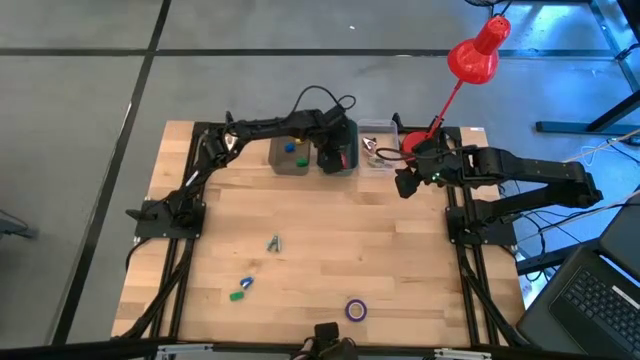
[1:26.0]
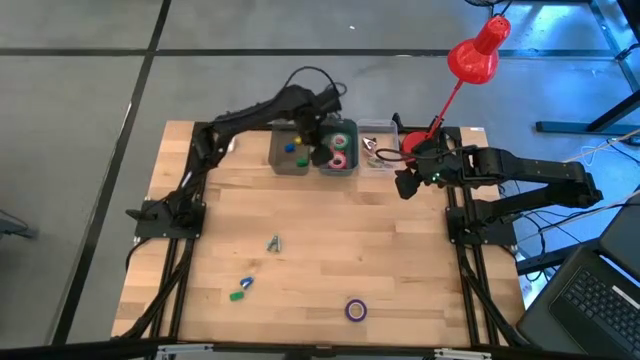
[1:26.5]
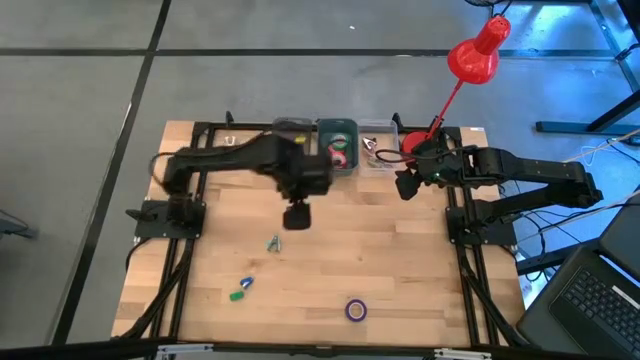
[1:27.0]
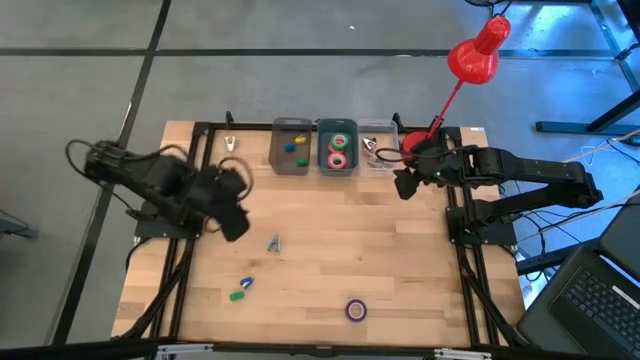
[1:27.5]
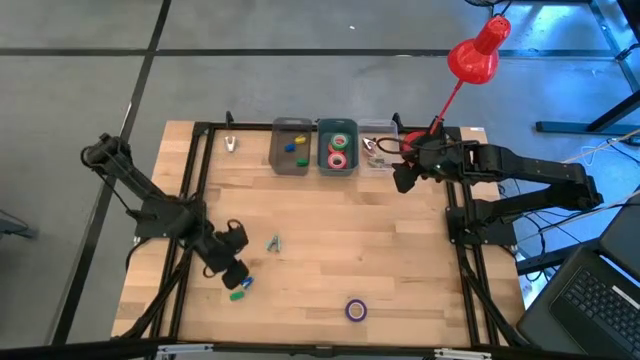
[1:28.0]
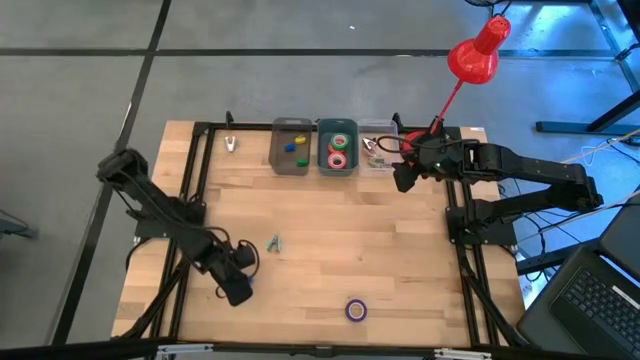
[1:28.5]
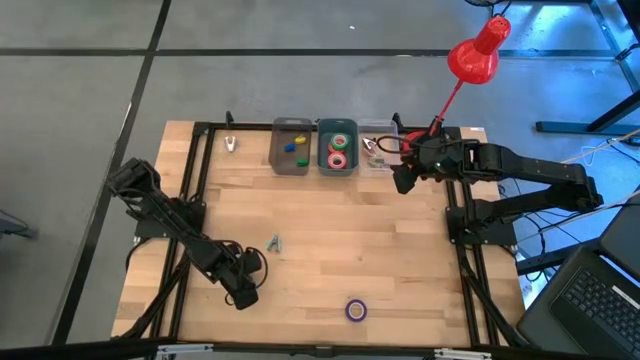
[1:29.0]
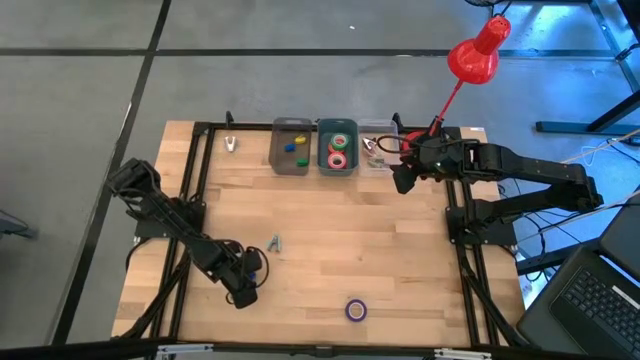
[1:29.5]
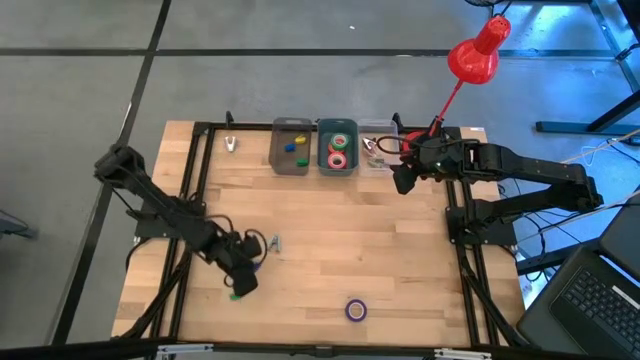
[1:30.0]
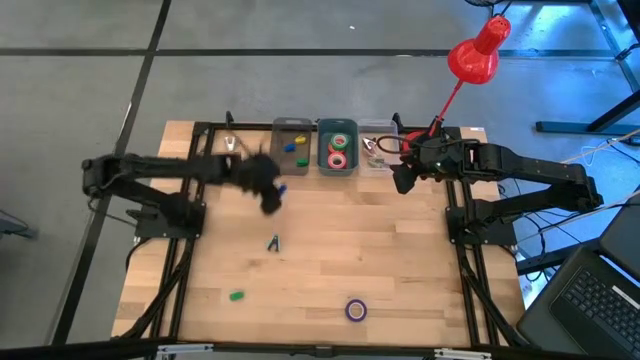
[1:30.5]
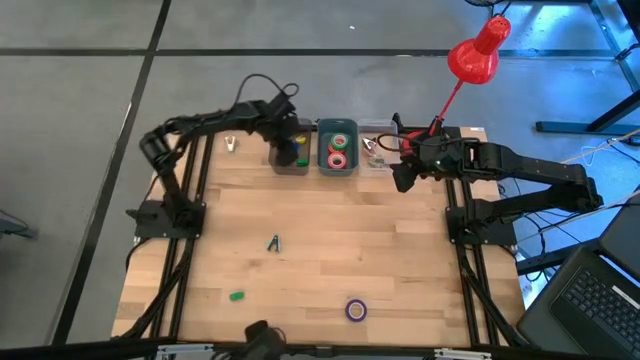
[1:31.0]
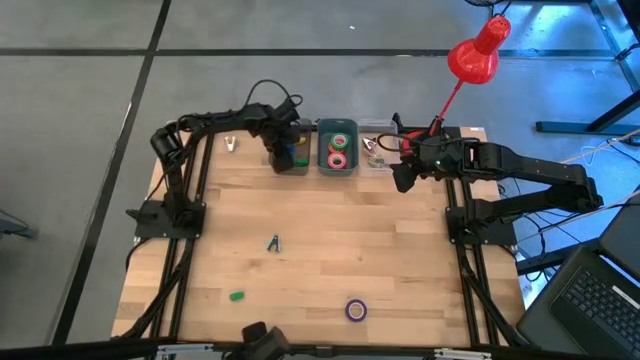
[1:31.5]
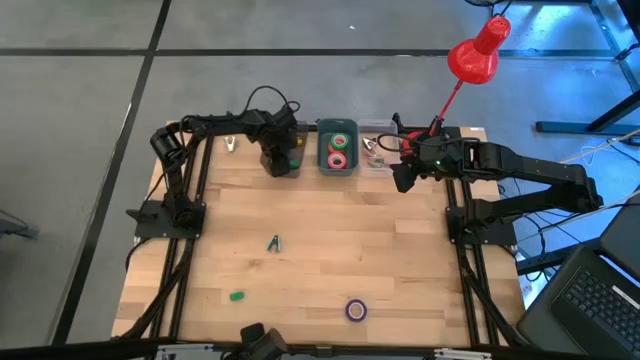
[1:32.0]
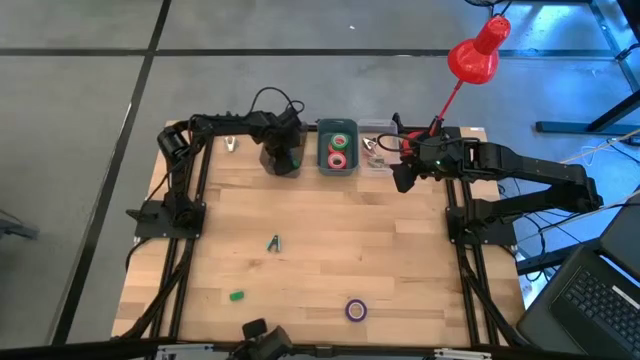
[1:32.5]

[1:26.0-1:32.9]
Task: Pick and place Stapler, Stapler remover, tape
Put the blue stapler into the black bin

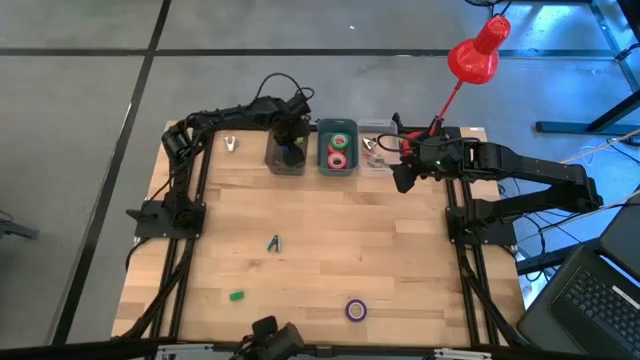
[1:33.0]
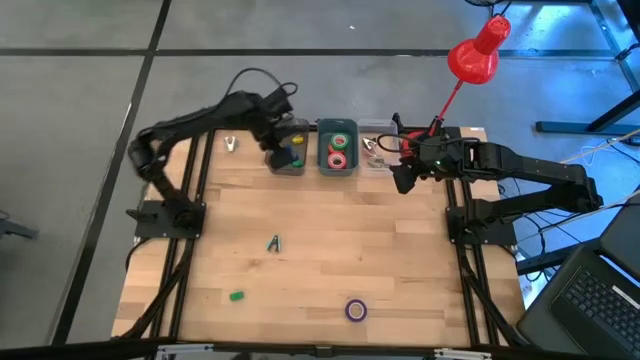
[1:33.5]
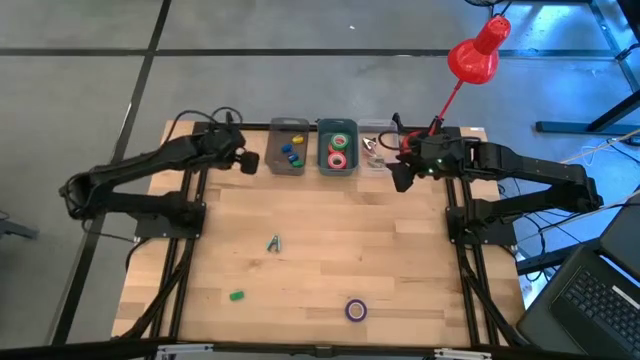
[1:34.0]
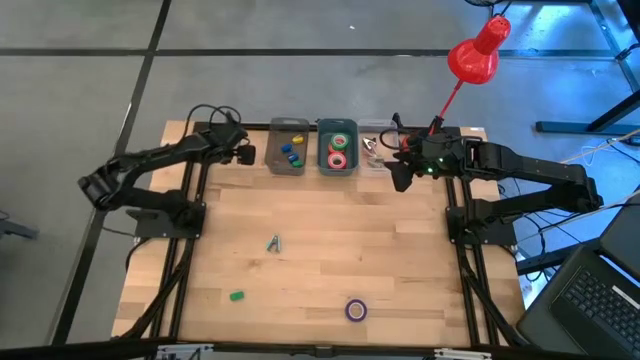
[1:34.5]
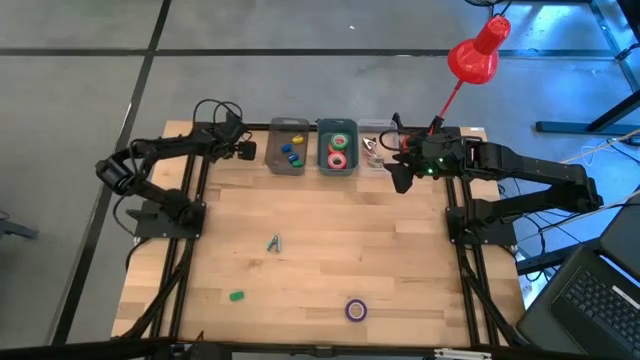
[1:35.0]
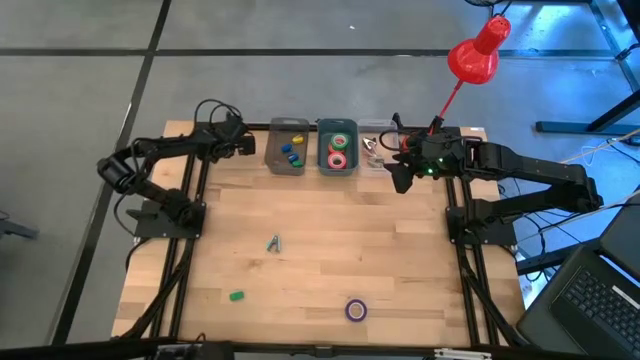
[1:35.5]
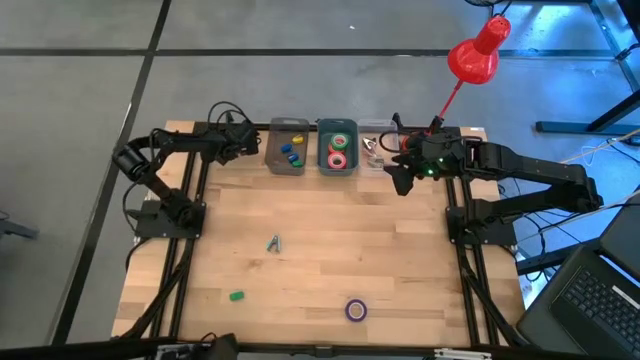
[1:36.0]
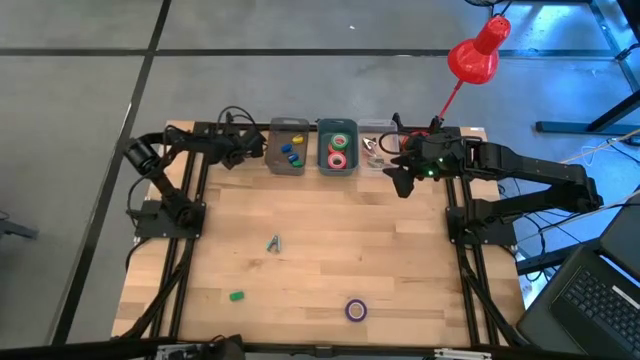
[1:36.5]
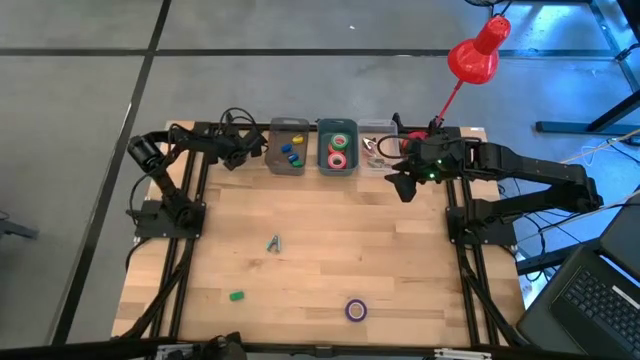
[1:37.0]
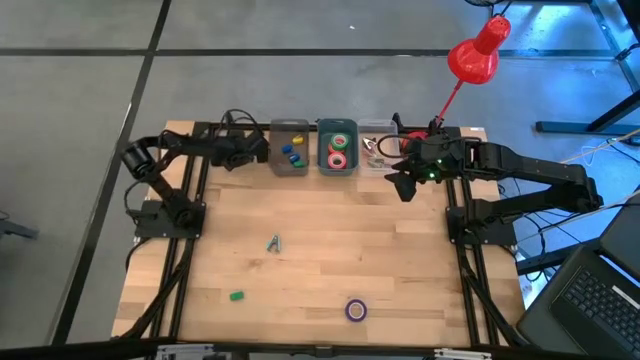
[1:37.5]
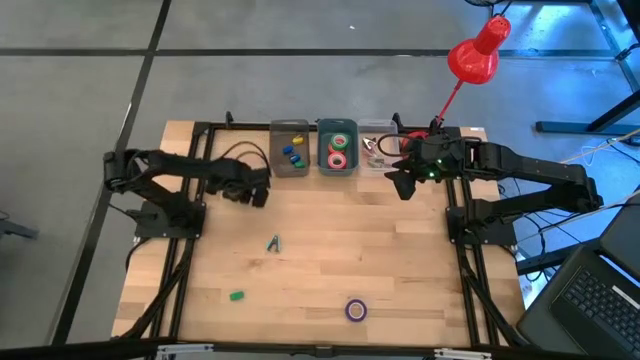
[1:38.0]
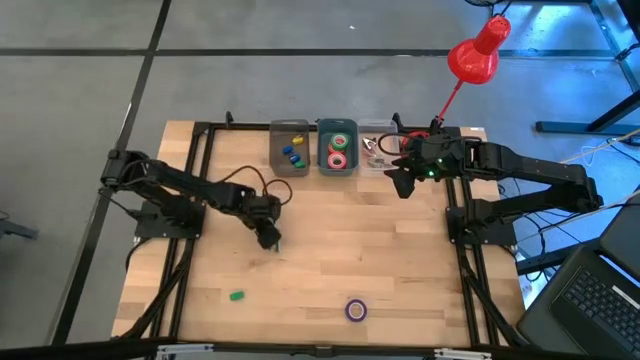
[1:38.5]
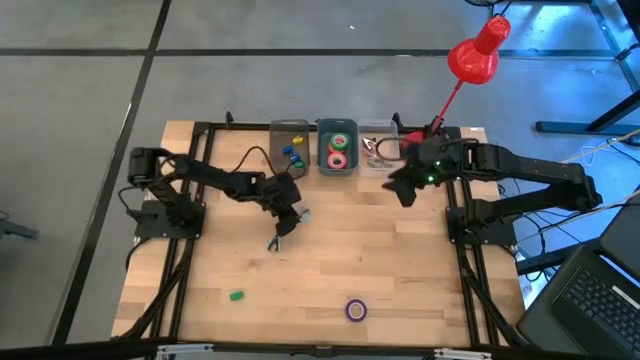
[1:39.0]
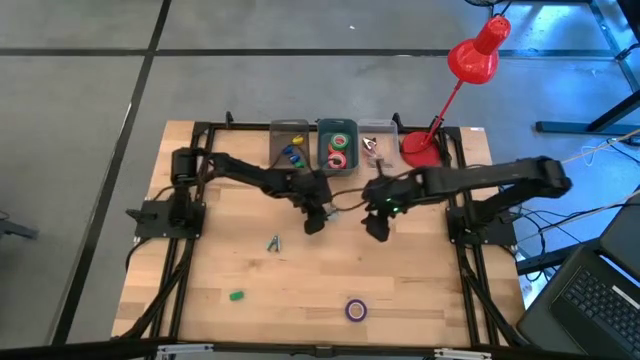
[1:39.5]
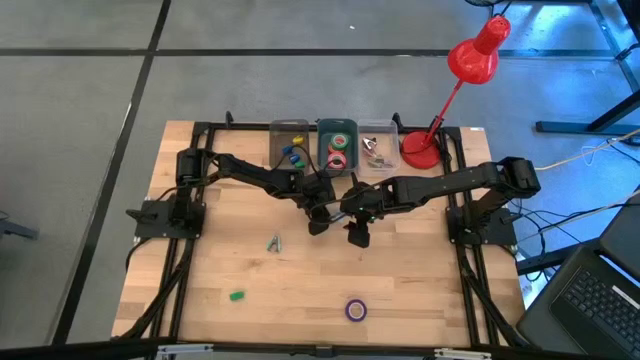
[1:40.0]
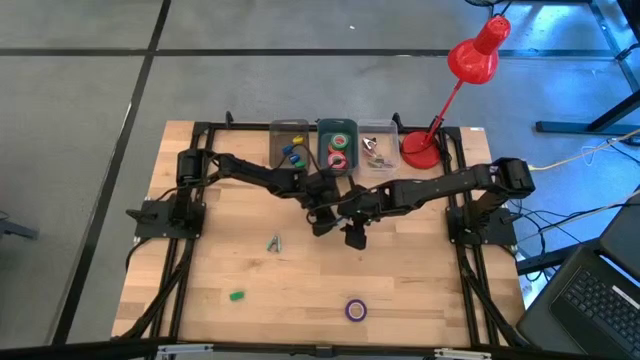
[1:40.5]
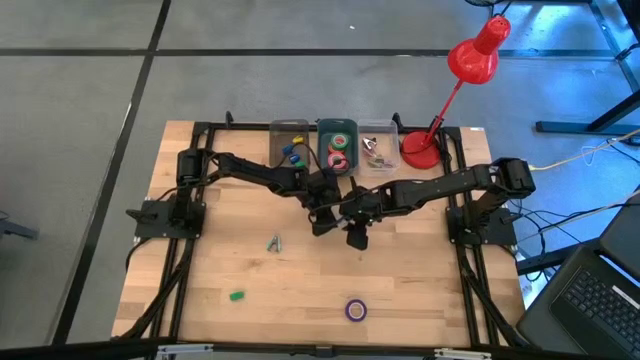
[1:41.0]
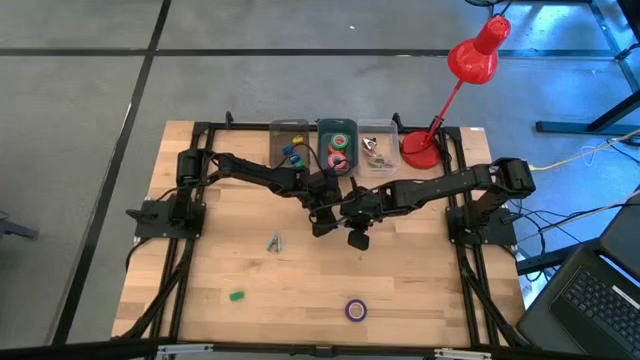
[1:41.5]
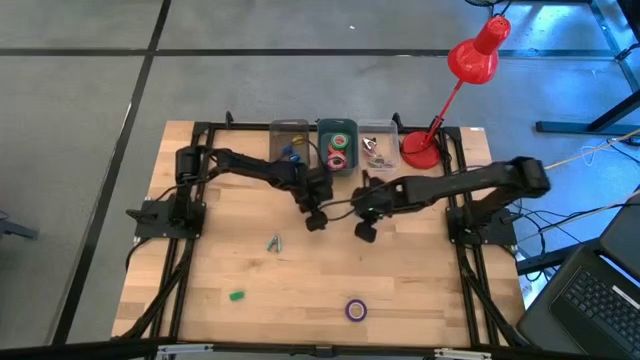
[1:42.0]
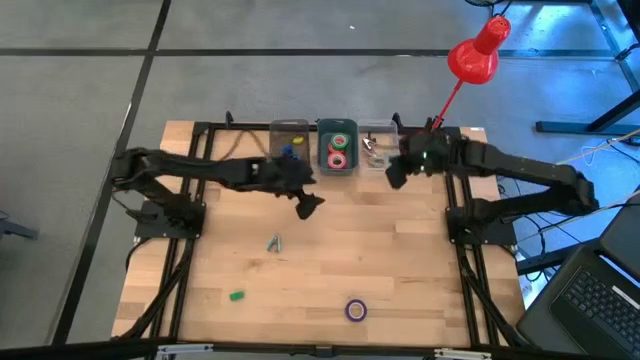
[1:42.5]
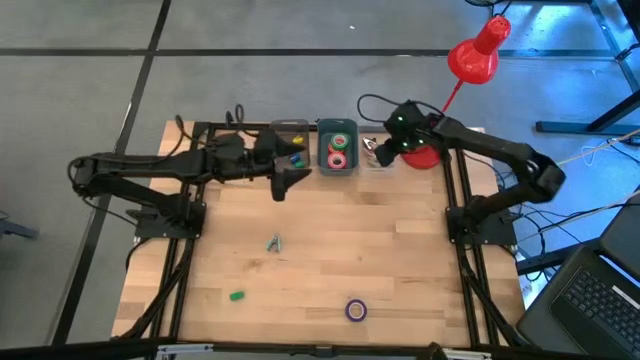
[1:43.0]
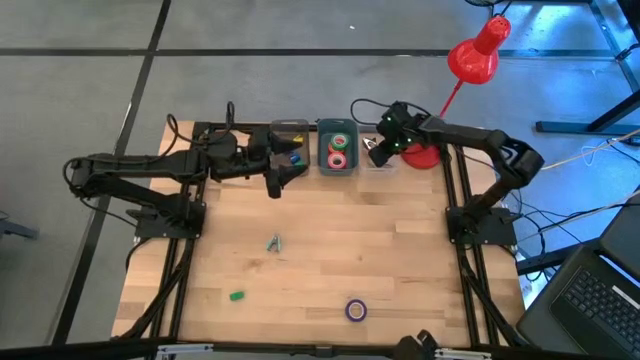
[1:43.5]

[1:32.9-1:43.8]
Put the blue staple remover into the transparent bin

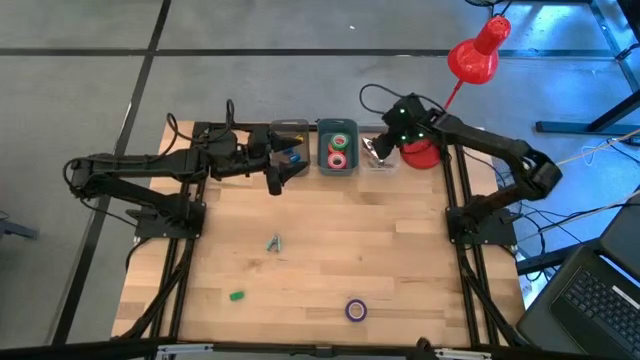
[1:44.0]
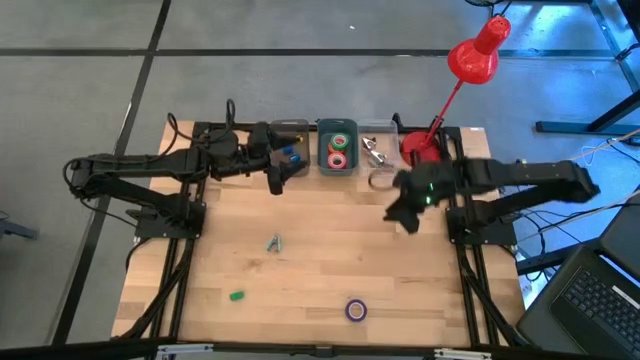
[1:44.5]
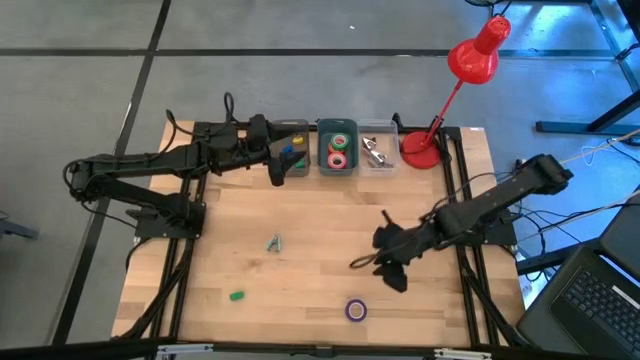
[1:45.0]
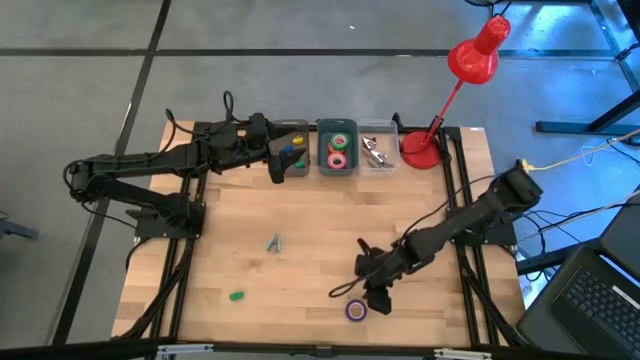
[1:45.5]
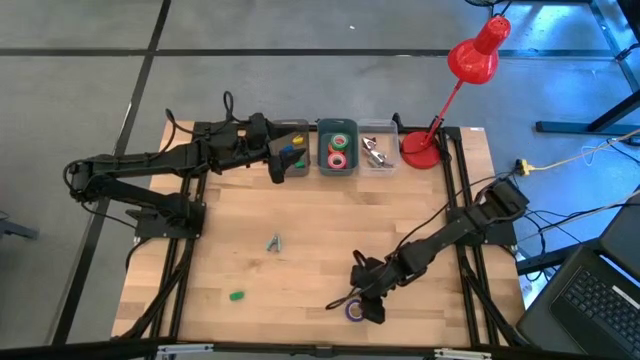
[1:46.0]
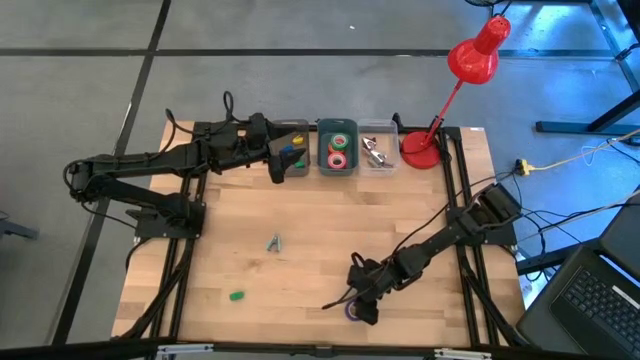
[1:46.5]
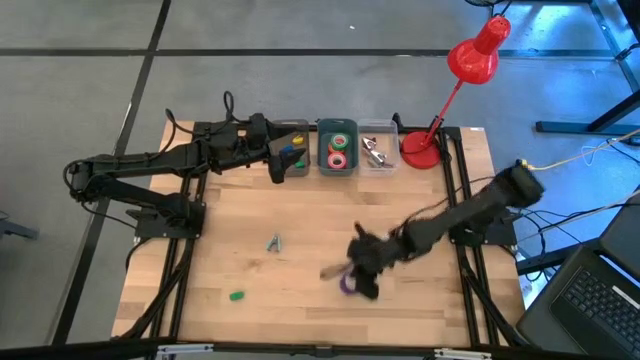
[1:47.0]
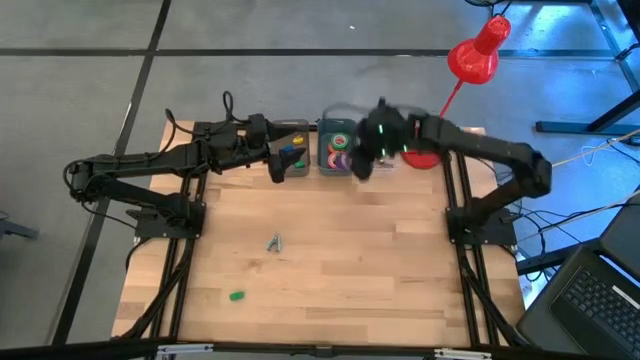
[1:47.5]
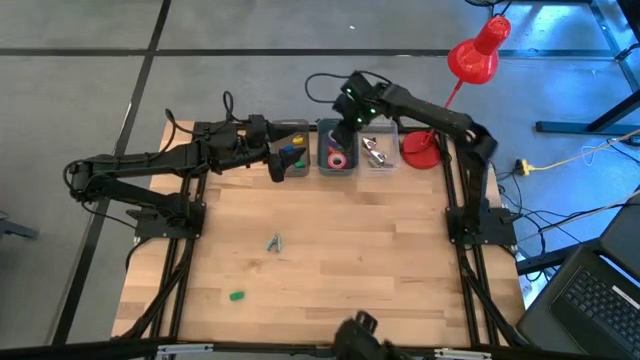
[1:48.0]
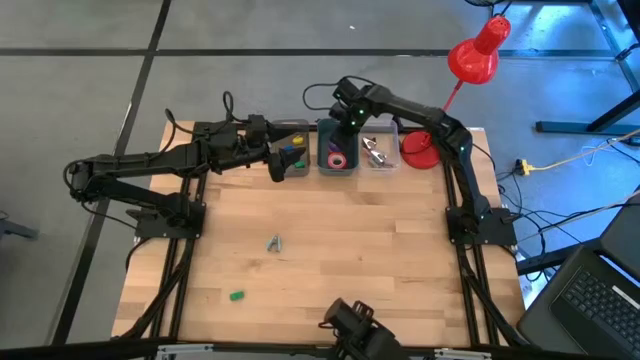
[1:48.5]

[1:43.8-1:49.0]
Put the violet tape into the green bin
